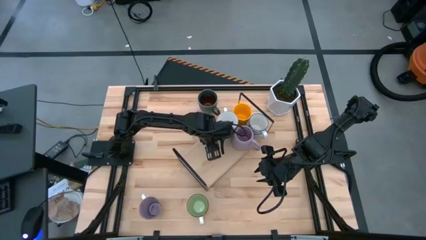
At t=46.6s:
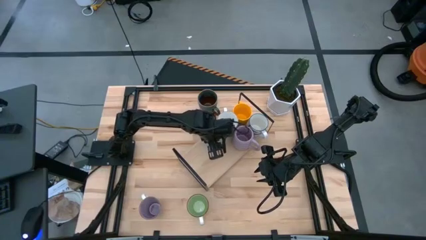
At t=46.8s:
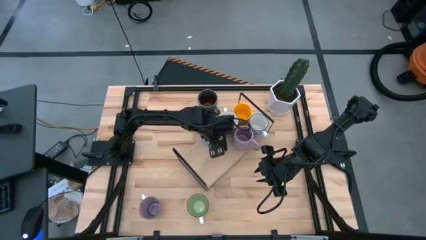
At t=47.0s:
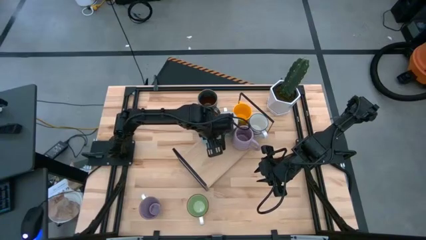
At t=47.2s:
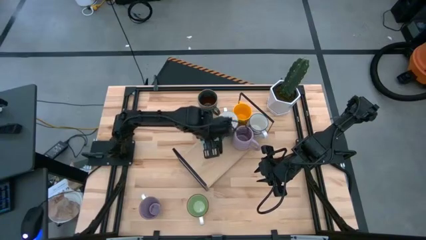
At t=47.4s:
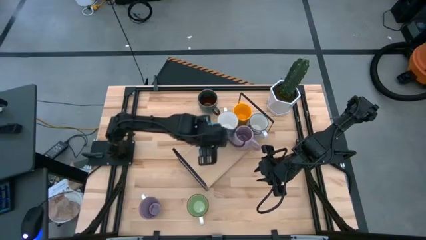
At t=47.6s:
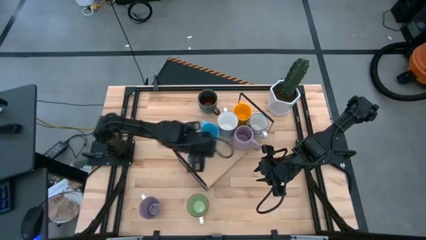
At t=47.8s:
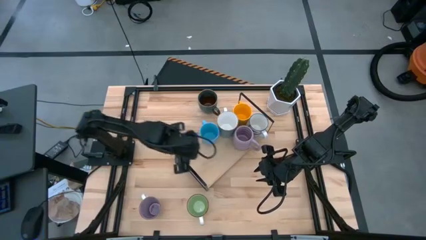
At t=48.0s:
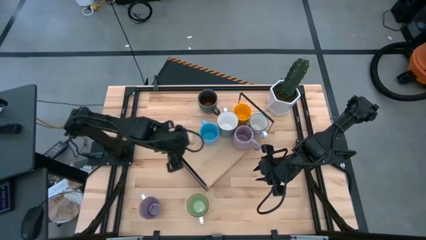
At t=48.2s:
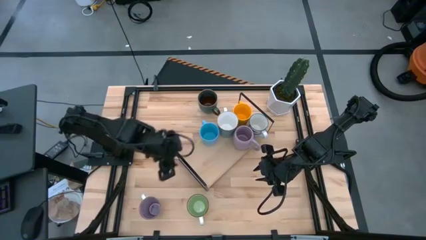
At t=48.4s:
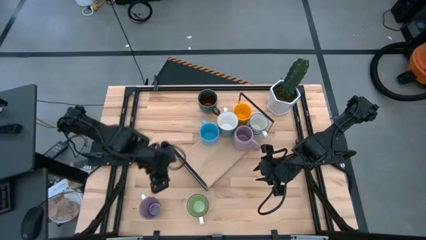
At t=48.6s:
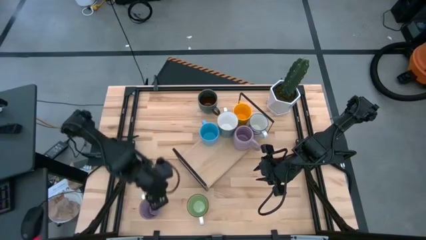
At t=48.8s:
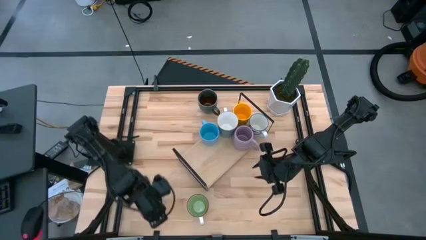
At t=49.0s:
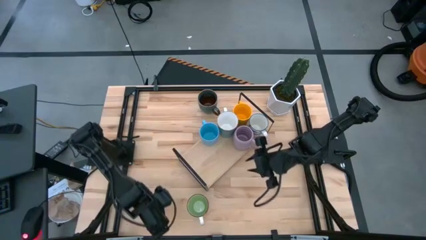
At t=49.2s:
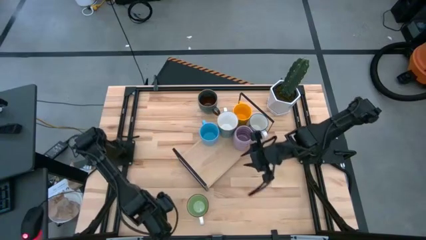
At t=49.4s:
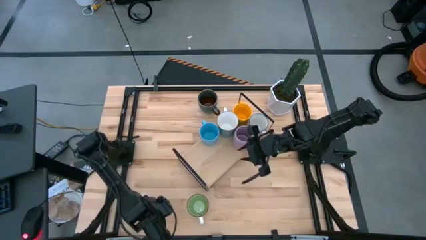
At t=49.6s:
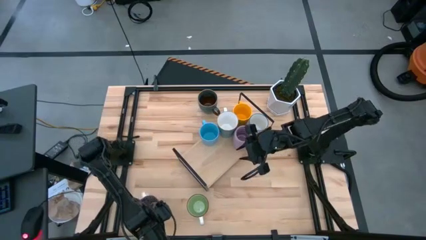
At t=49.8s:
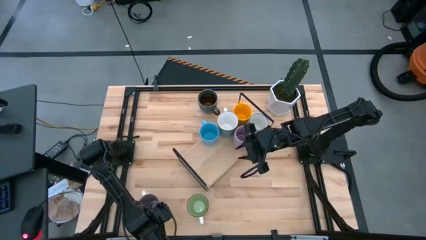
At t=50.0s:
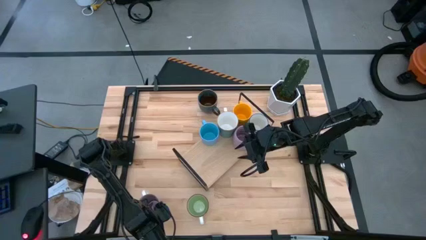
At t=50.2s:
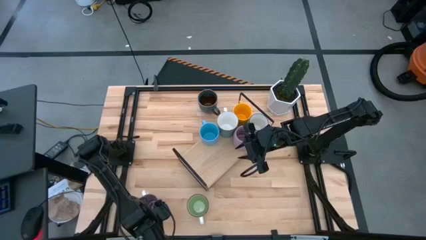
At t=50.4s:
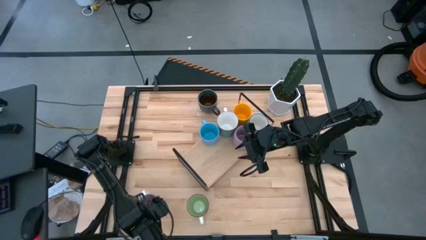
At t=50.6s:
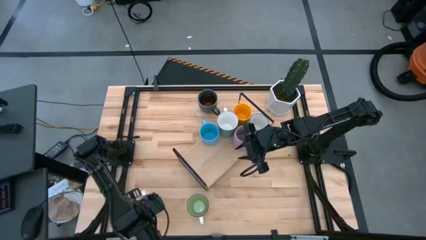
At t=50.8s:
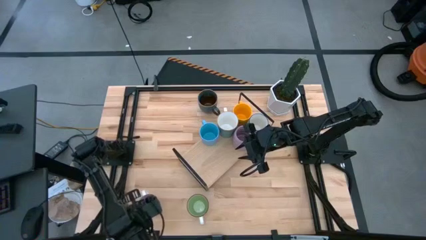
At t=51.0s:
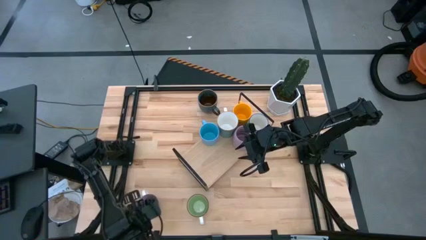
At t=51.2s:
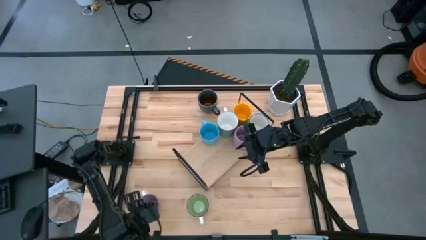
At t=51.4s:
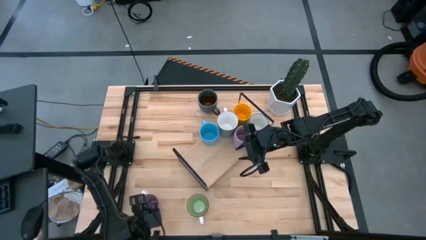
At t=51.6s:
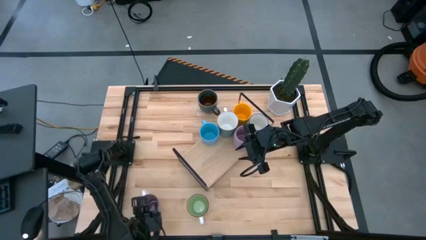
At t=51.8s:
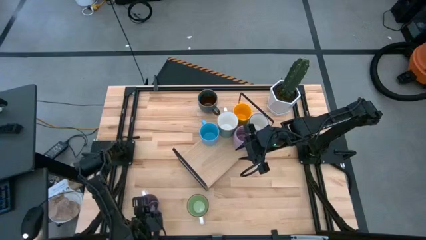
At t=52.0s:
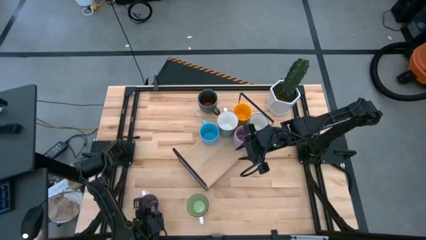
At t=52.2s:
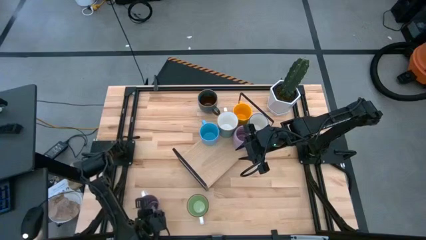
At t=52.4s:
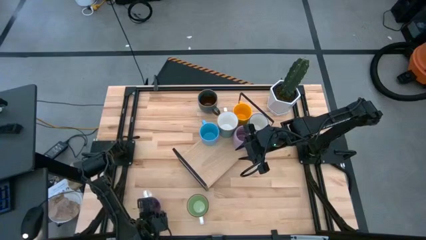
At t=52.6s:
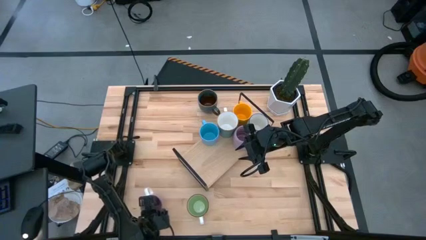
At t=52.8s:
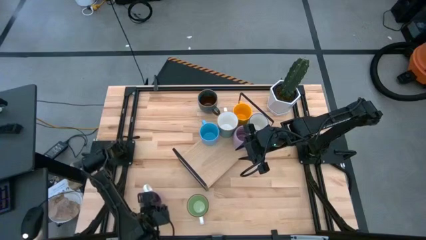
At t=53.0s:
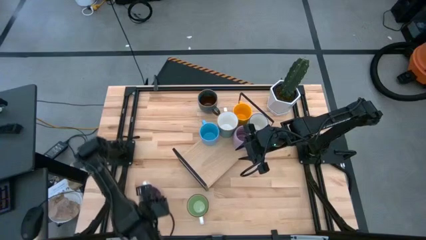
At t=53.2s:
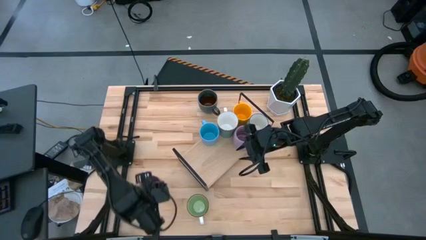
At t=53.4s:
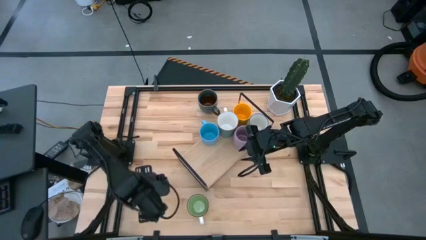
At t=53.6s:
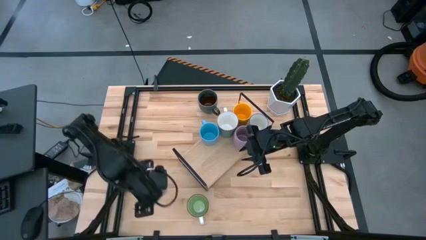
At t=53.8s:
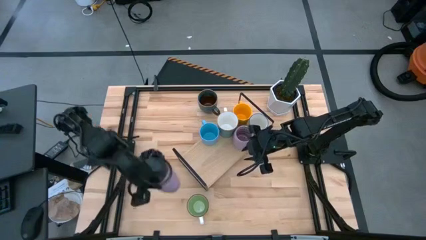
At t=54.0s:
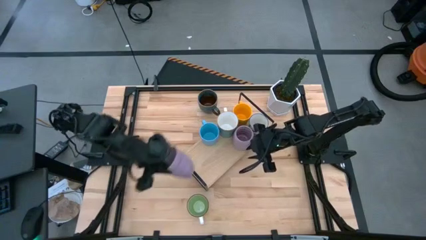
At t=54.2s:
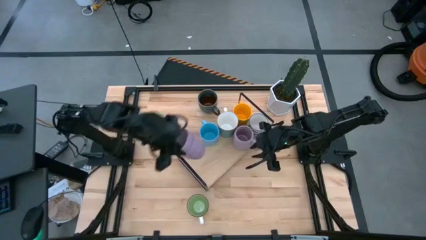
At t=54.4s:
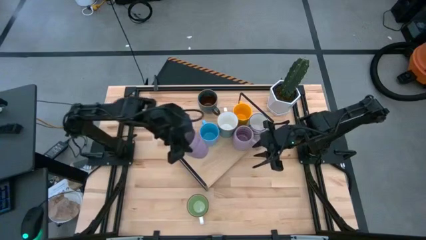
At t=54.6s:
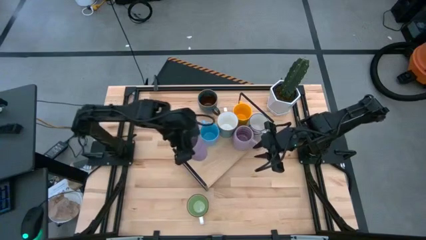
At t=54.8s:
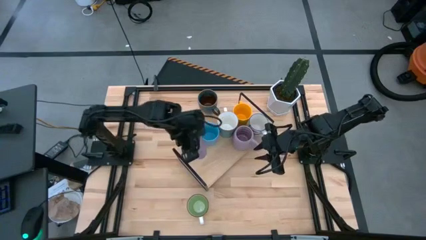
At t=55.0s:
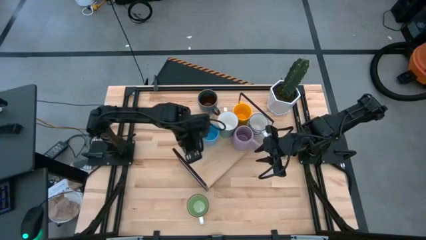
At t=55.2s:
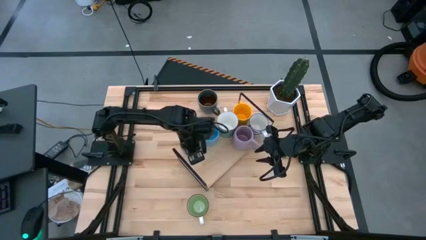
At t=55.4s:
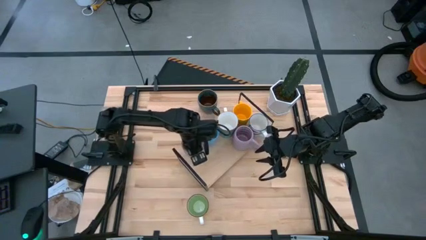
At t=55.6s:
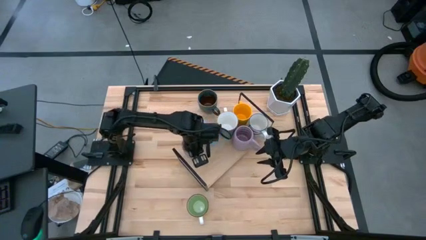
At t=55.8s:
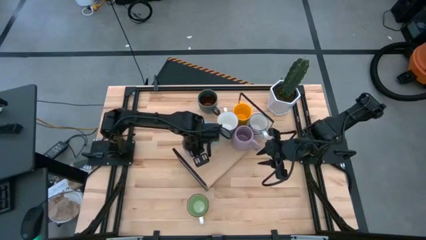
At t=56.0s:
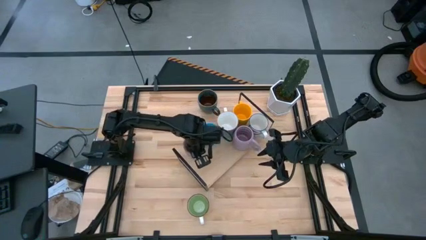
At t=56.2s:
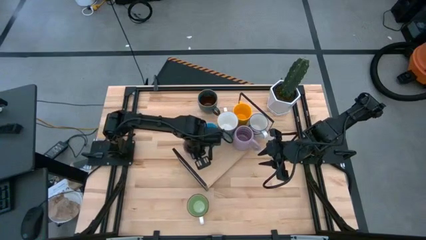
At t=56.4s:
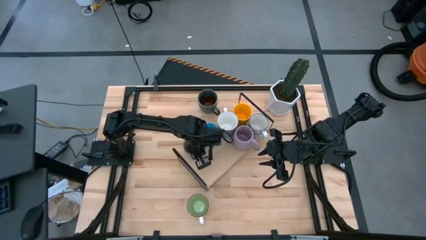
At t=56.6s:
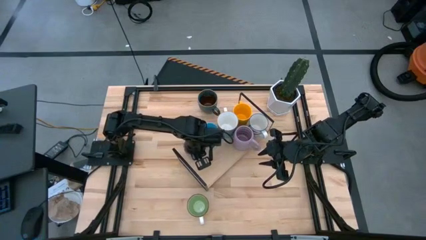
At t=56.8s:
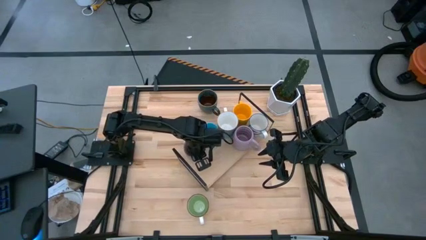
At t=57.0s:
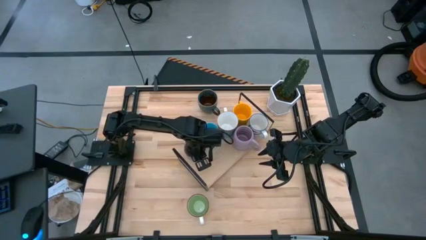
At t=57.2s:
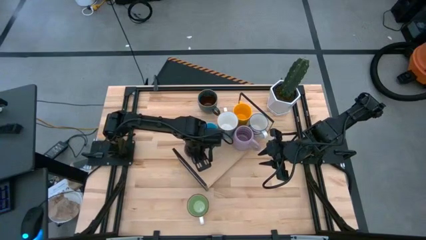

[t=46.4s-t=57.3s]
Task: Place coffee mugs
Put the purple mug on the shelf

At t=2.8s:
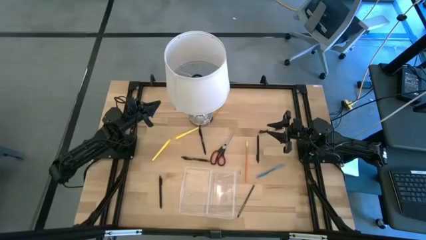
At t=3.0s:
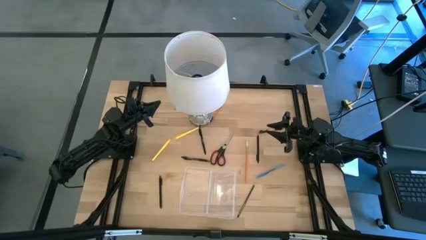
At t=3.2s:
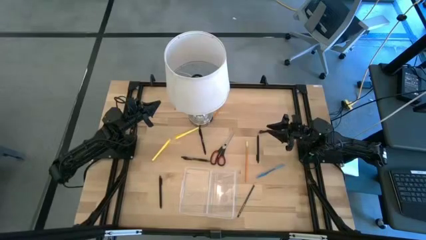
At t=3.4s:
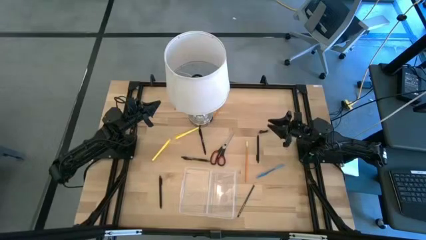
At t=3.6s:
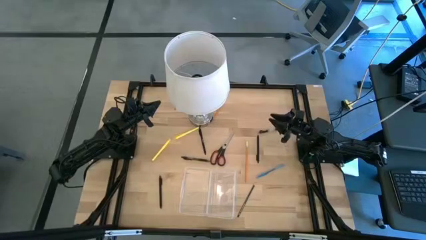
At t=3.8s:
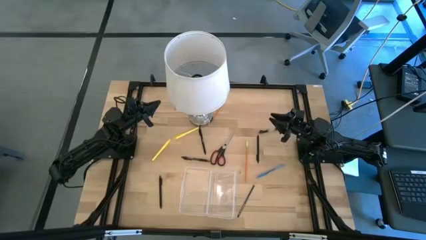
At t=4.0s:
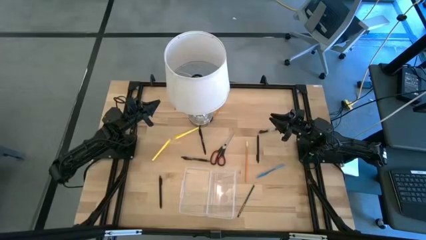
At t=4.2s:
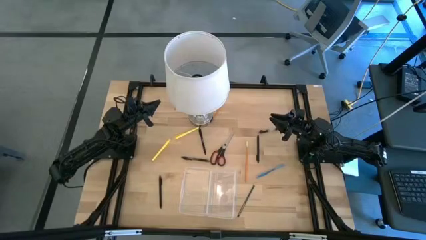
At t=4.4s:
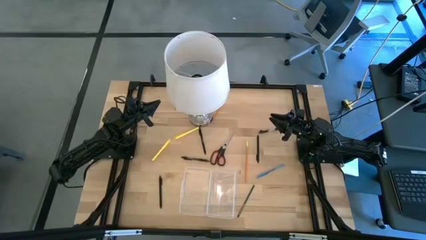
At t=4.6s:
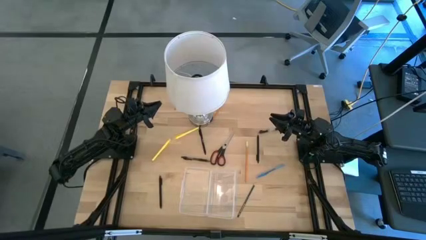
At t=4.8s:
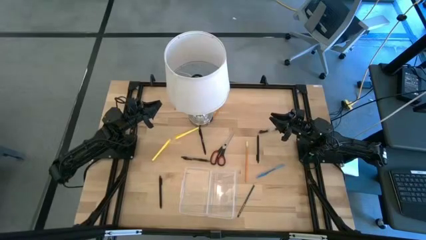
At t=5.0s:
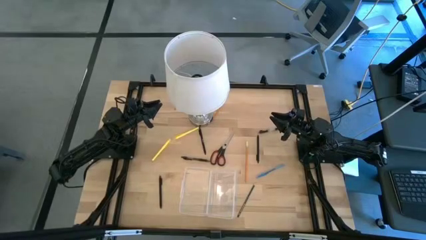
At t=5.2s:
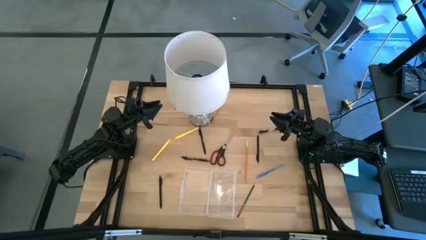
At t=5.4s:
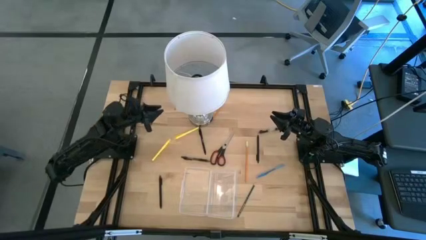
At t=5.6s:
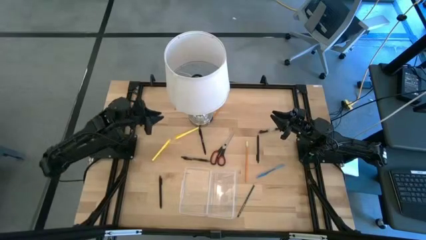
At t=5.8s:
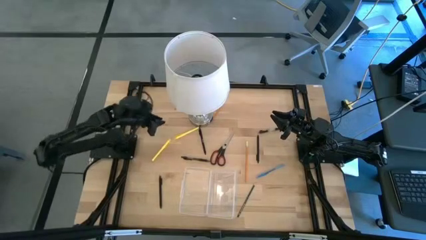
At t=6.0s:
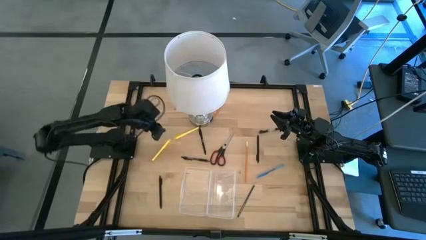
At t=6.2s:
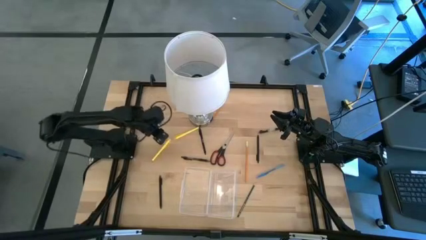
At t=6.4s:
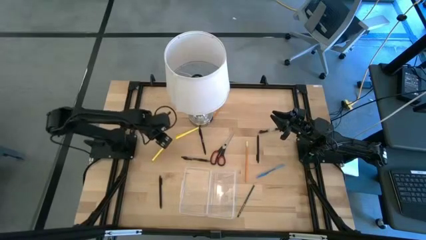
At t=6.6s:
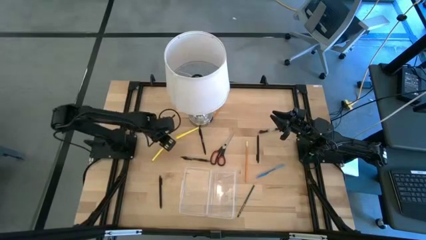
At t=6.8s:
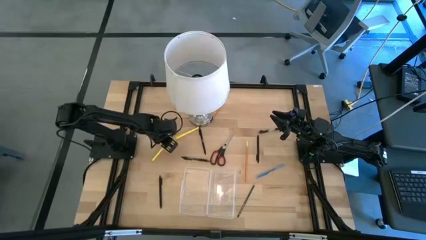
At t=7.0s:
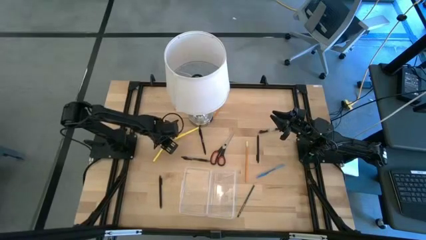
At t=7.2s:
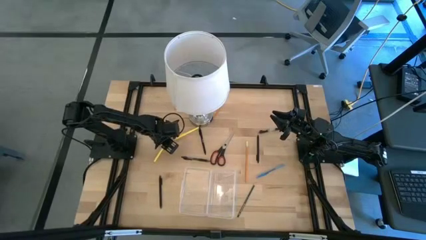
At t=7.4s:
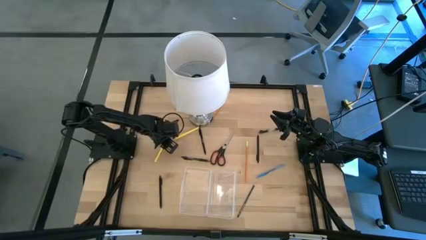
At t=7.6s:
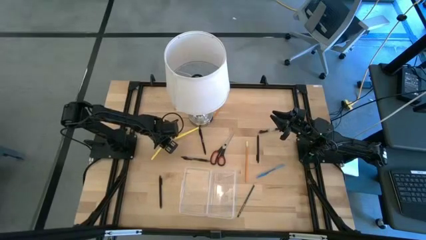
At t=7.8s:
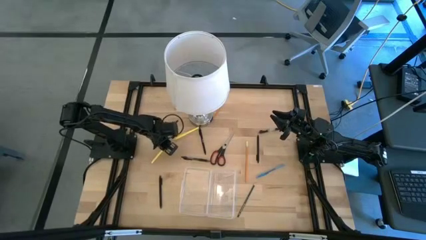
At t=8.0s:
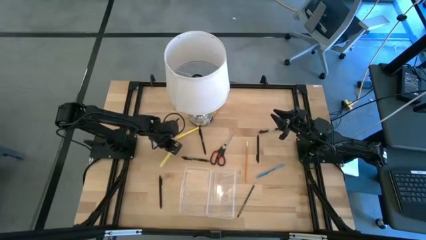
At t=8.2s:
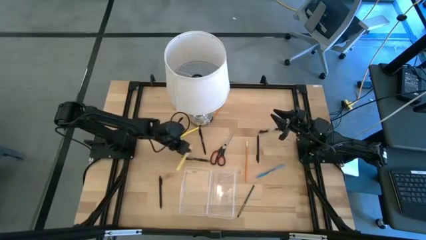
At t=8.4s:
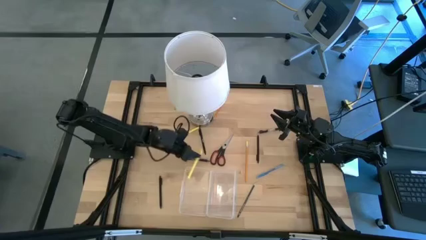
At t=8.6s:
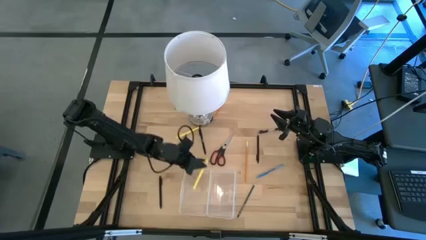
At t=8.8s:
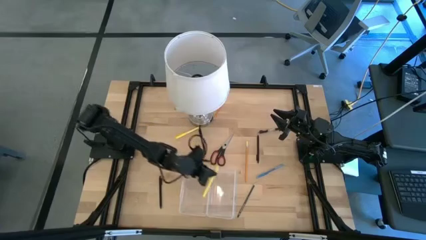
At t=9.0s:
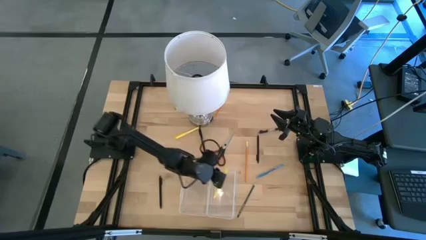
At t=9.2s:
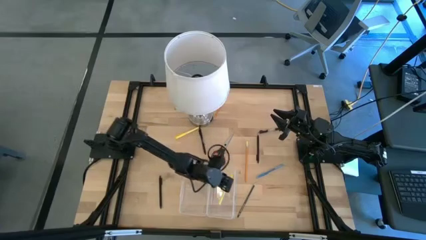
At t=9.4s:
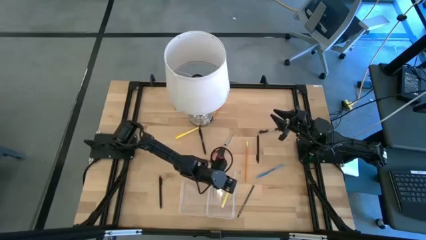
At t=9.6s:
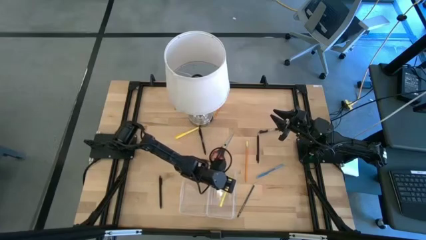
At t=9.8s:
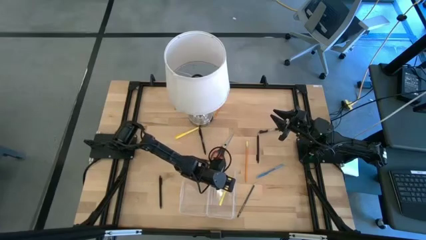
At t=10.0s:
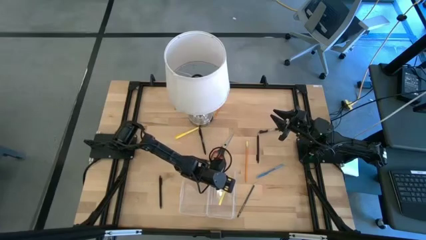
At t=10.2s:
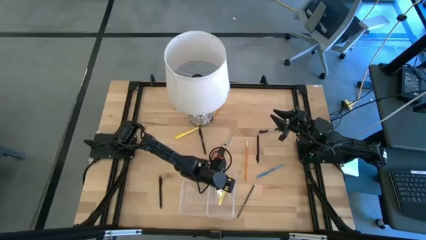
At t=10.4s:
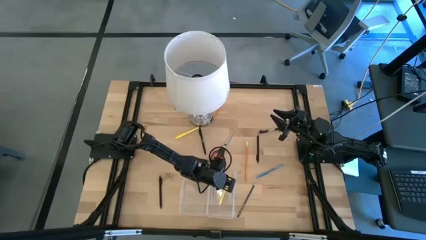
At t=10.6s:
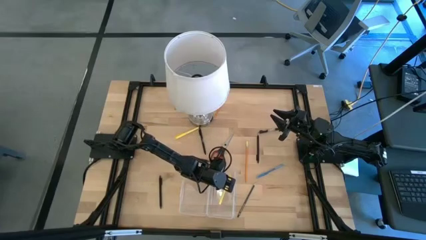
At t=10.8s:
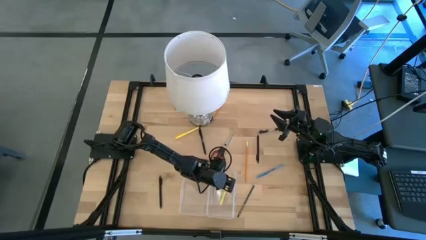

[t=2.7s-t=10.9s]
Task: Pick & place school supplies into a supply box
Put the bottom yellow marker pen into the transparent supply box
